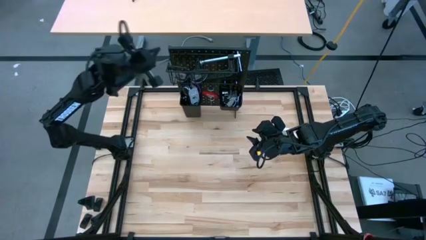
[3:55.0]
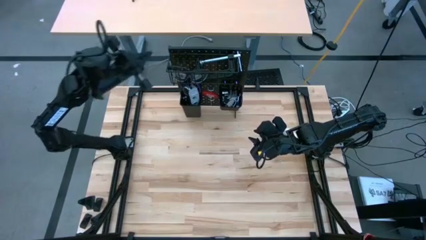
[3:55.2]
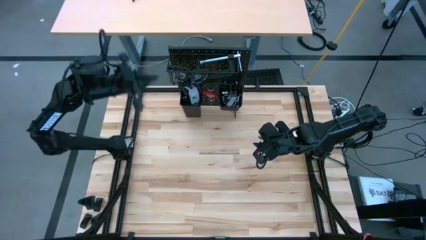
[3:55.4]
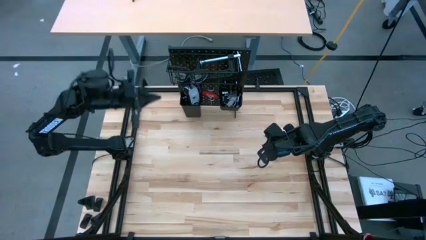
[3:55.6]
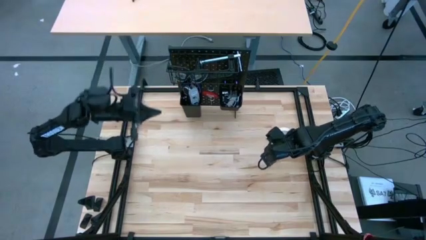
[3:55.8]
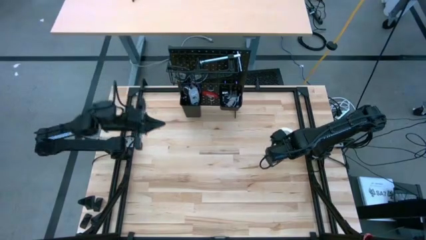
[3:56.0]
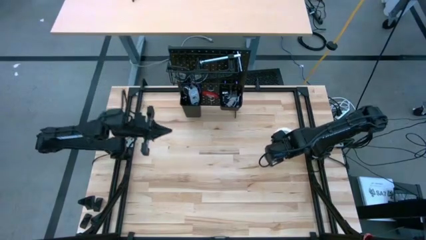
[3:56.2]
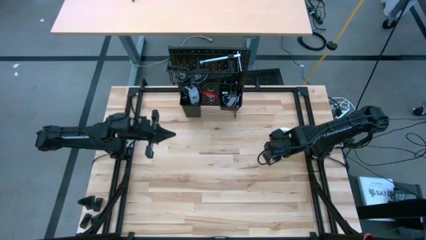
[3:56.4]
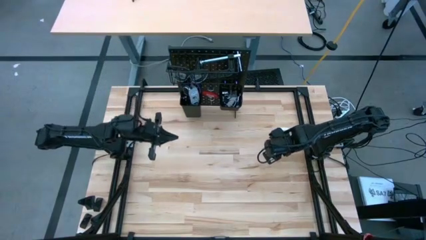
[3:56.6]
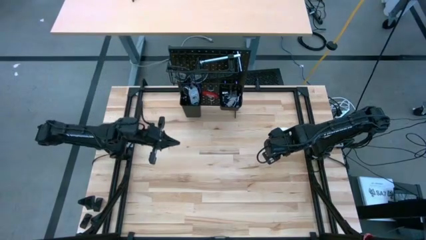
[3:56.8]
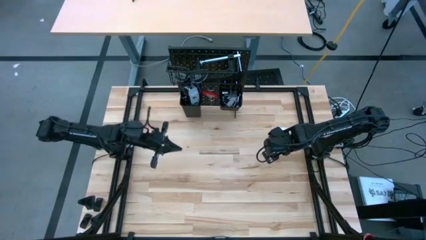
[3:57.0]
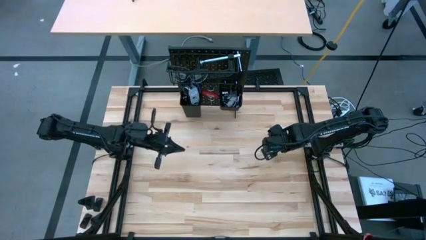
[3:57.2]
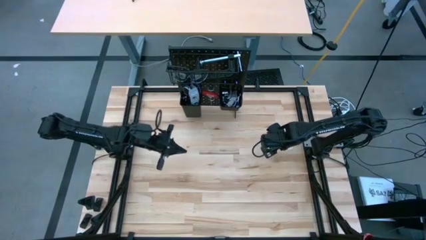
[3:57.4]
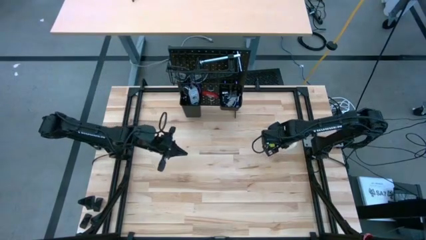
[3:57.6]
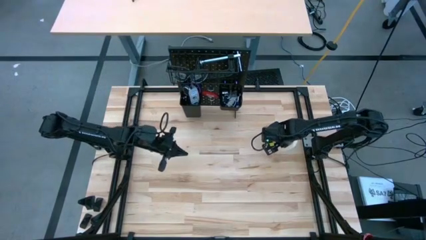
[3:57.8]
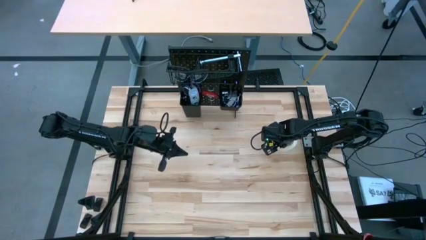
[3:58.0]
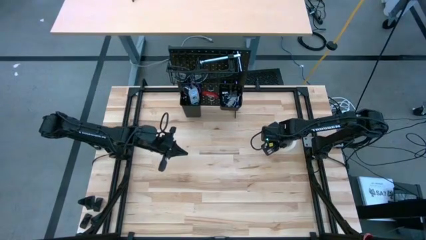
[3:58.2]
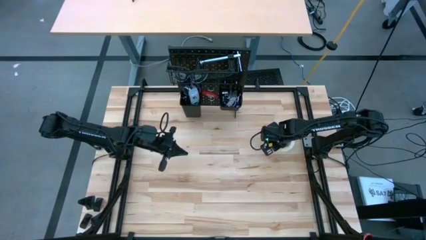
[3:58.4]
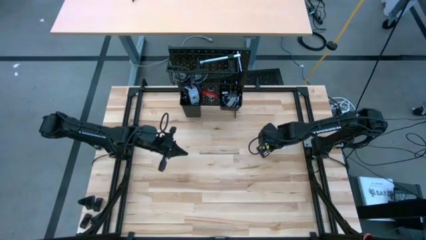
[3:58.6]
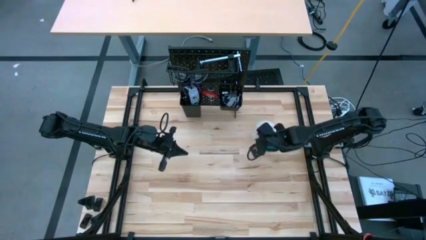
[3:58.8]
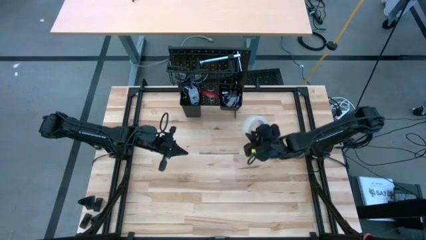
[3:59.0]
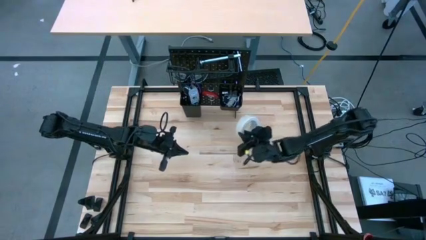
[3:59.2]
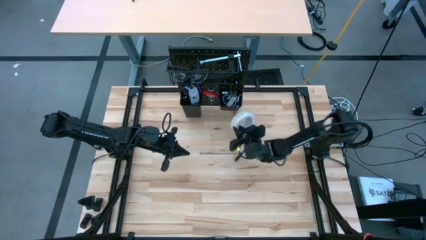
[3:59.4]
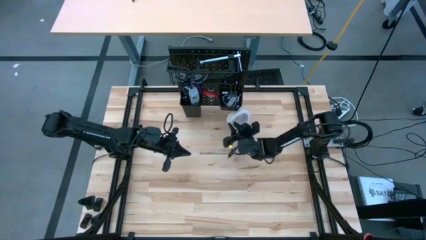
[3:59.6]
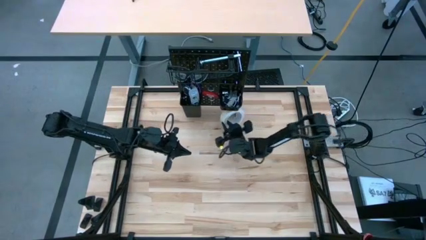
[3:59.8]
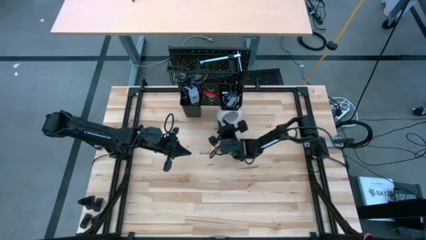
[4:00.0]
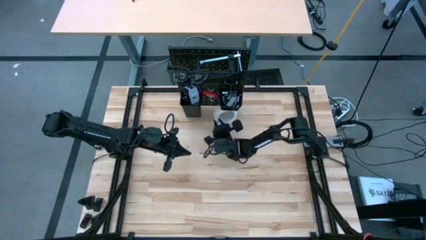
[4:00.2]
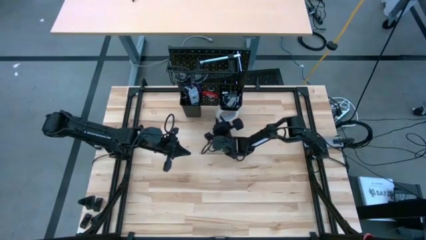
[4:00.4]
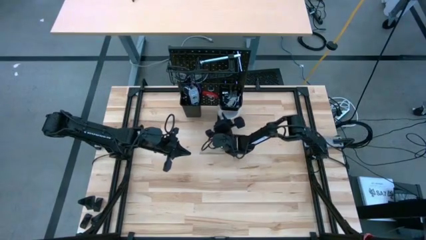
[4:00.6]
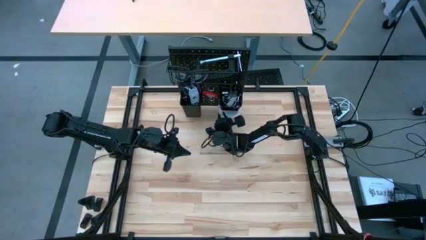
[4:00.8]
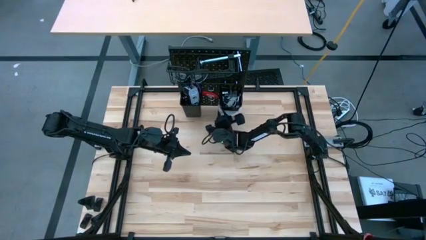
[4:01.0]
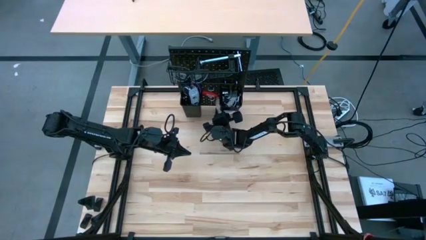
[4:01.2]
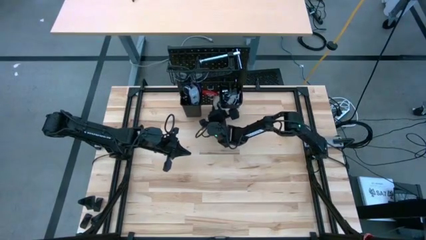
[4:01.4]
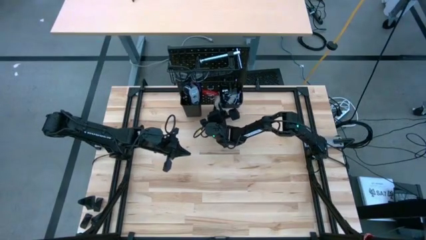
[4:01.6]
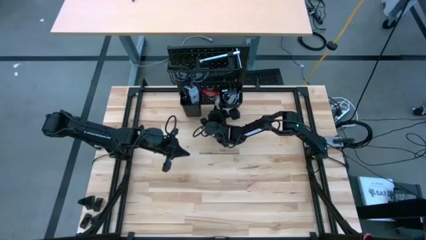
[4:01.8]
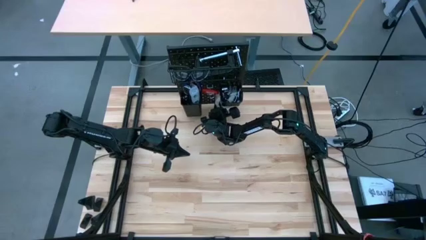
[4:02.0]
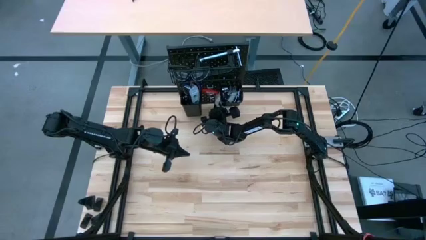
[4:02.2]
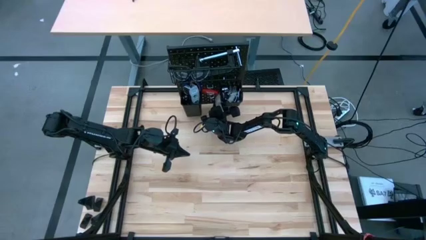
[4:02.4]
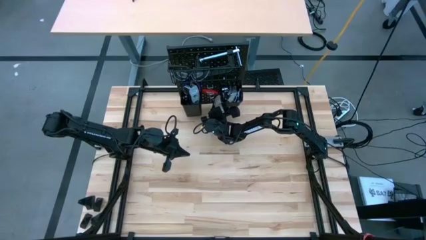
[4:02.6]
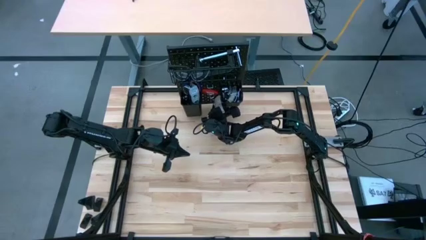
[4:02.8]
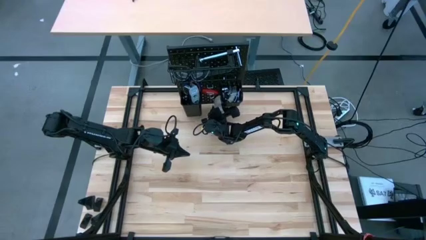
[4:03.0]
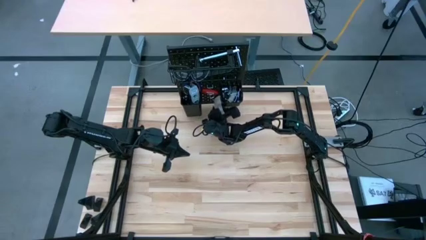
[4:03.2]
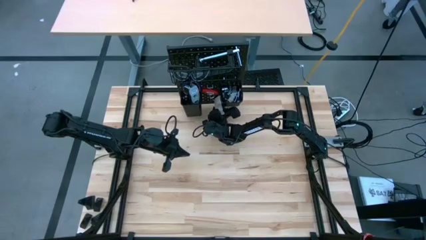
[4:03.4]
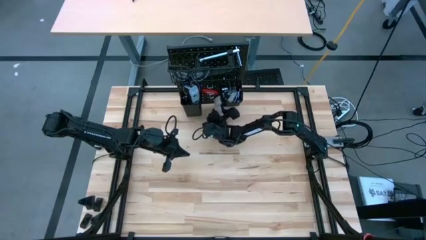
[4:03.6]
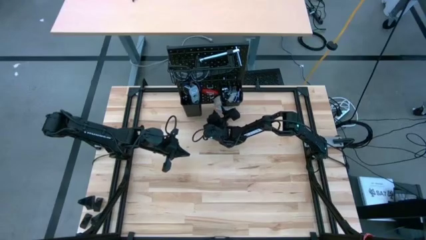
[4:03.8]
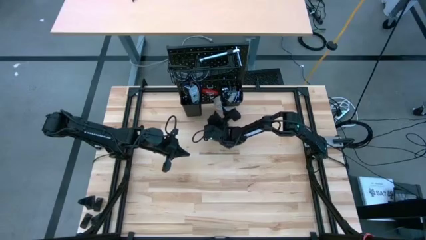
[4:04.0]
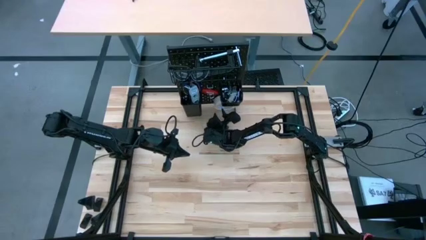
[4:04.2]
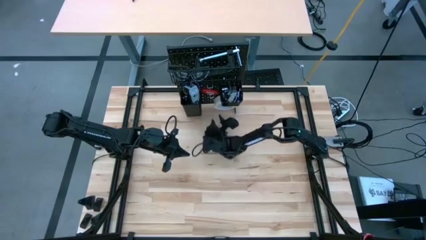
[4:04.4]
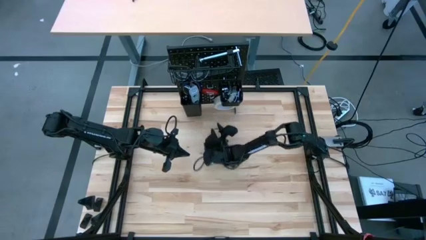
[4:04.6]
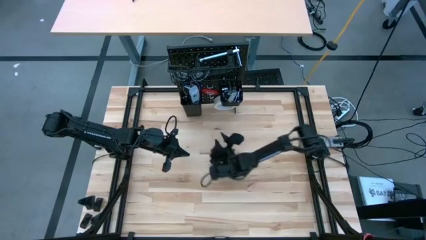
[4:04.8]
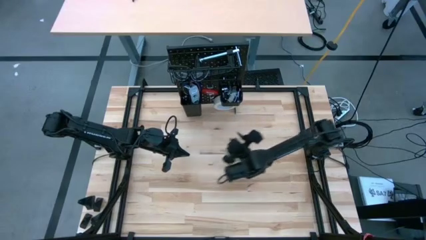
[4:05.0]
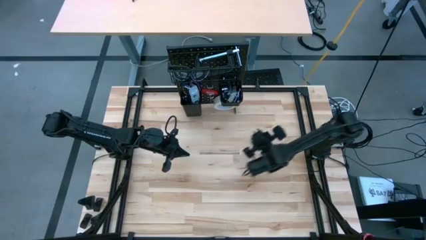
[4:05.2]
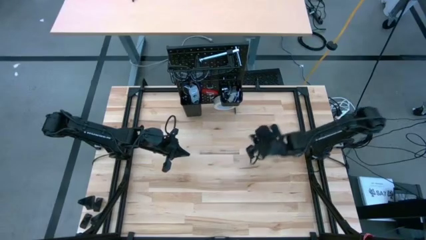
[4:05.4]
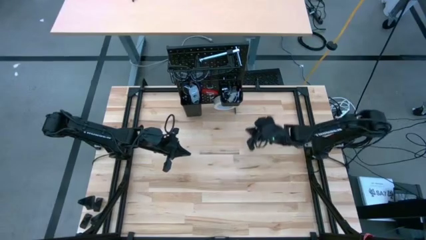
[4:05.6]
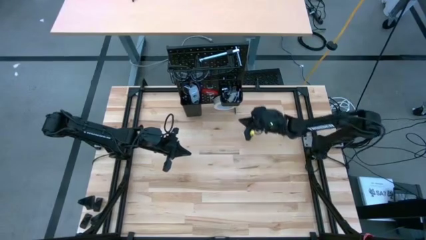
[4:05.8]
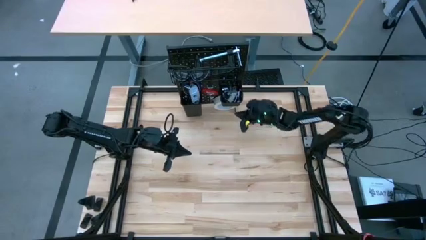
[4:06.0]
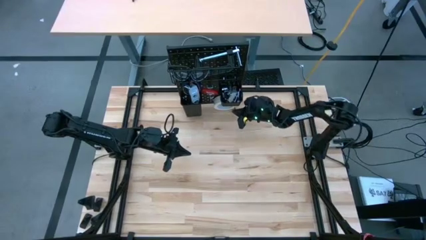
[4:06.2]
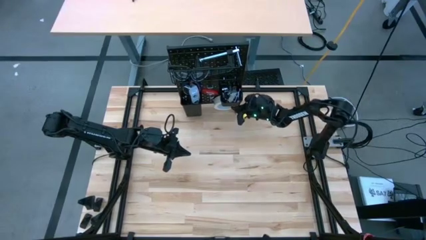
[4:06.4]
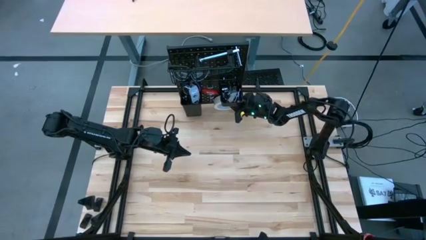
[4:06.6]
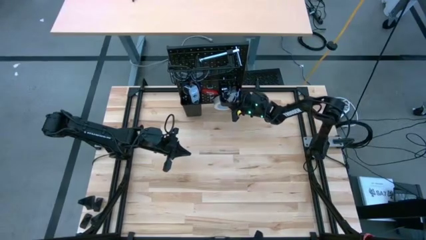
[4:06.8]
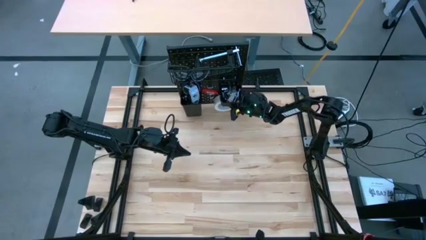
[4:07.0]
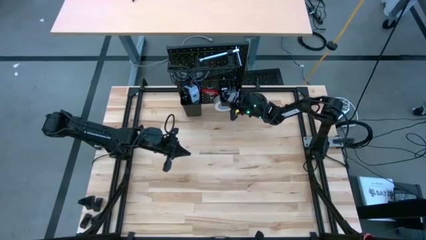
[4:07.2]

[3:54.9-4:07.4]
Task: Hang tools onto peg board
Hang the white tape on the peg board
